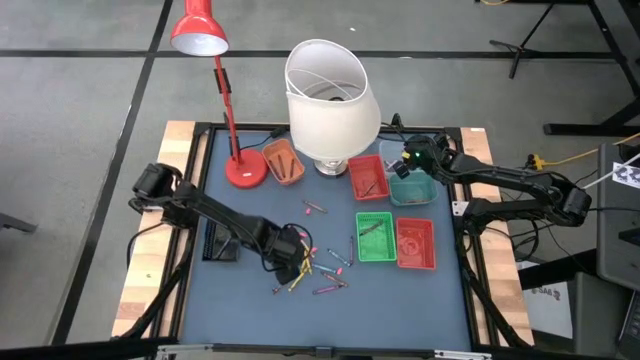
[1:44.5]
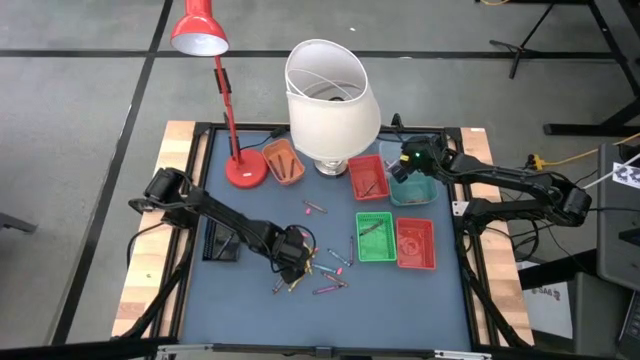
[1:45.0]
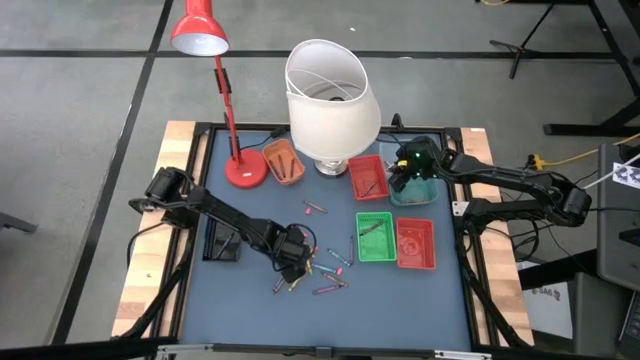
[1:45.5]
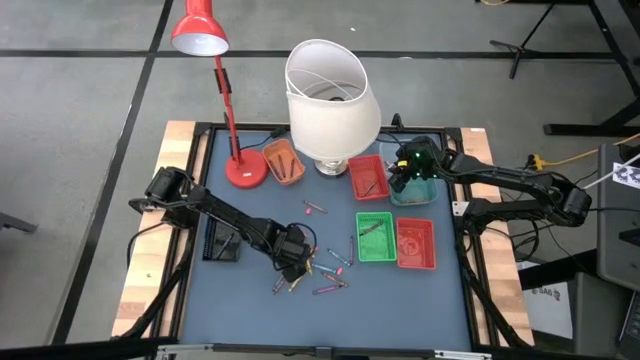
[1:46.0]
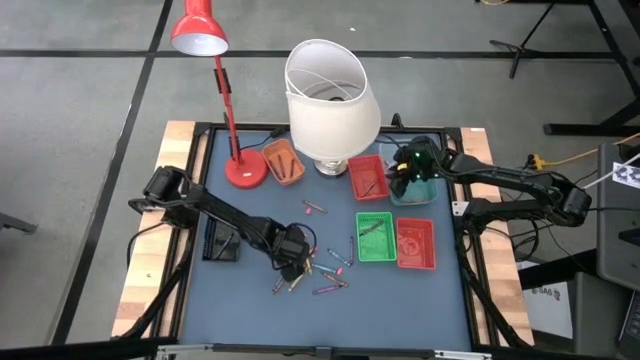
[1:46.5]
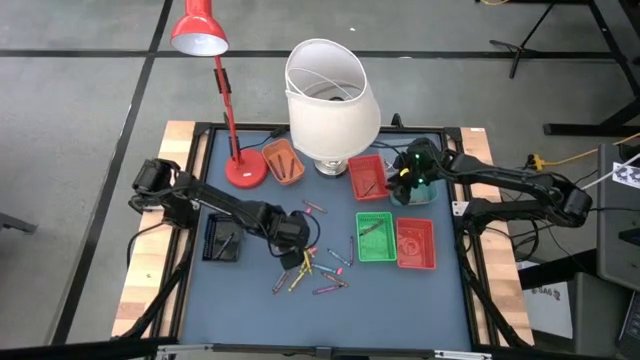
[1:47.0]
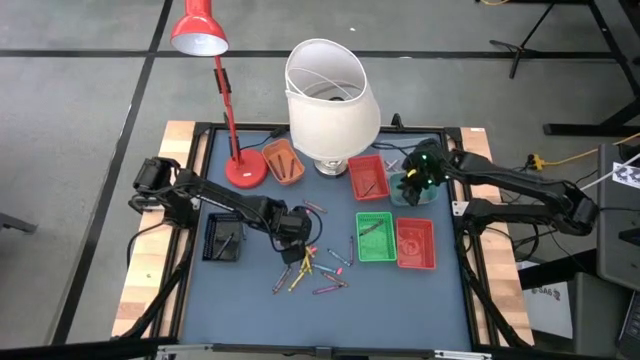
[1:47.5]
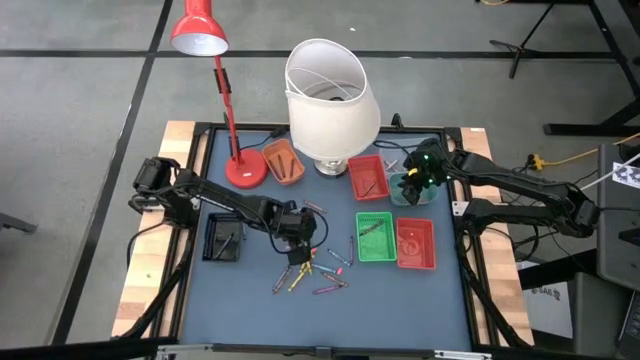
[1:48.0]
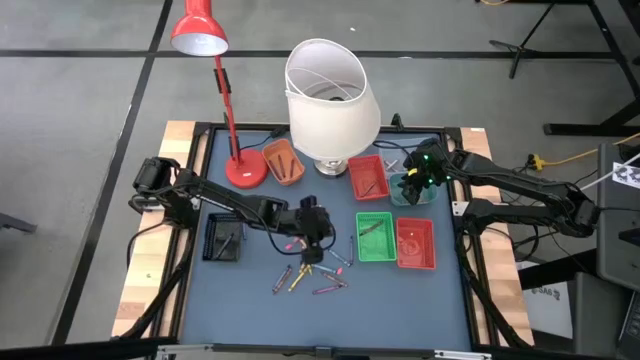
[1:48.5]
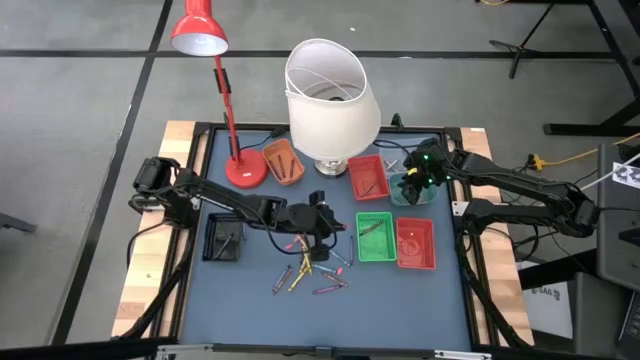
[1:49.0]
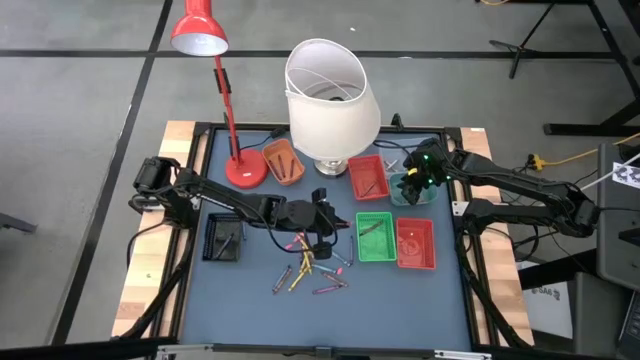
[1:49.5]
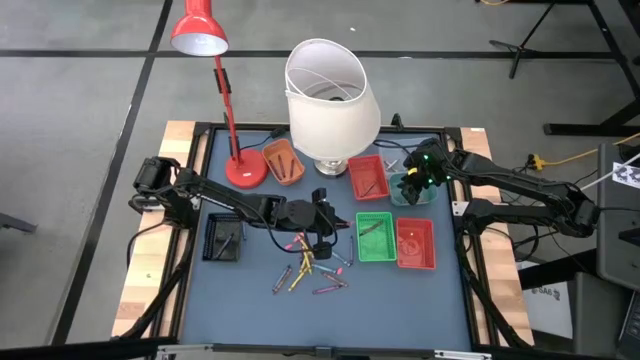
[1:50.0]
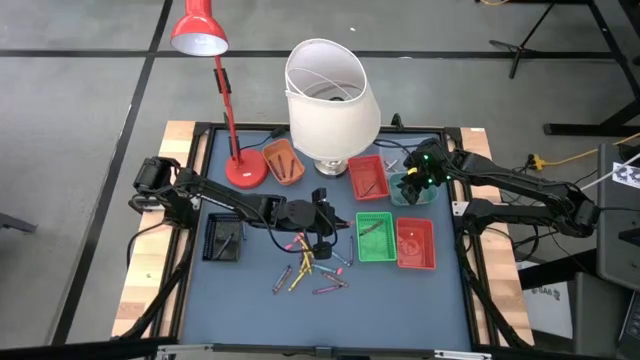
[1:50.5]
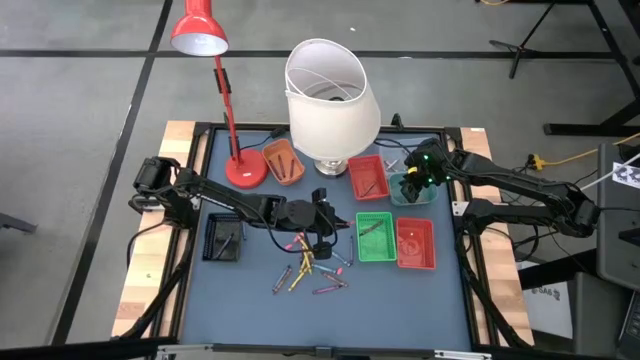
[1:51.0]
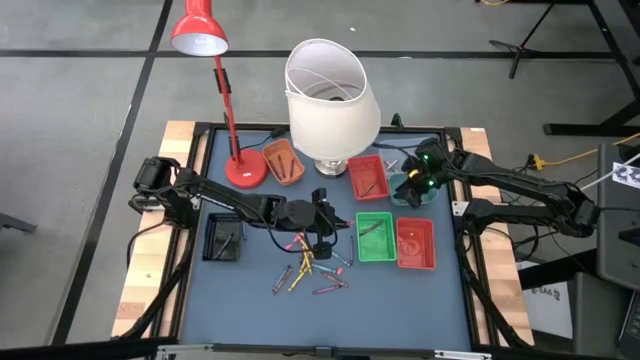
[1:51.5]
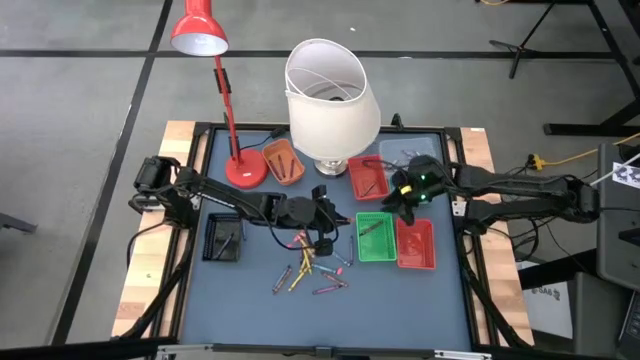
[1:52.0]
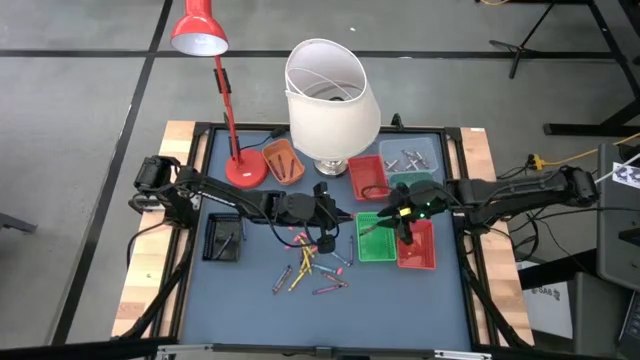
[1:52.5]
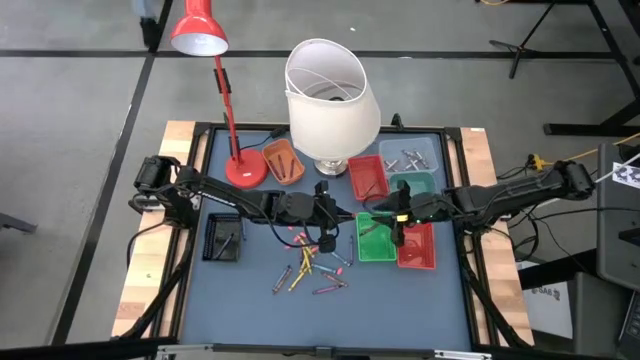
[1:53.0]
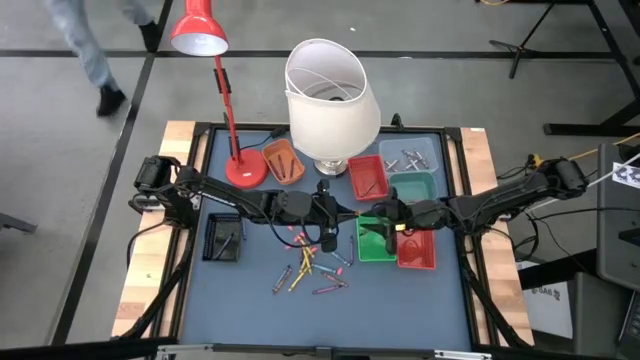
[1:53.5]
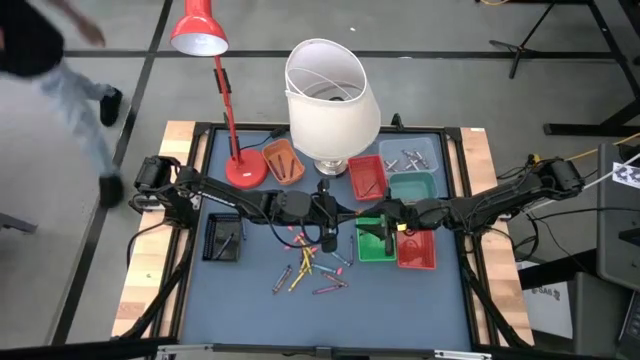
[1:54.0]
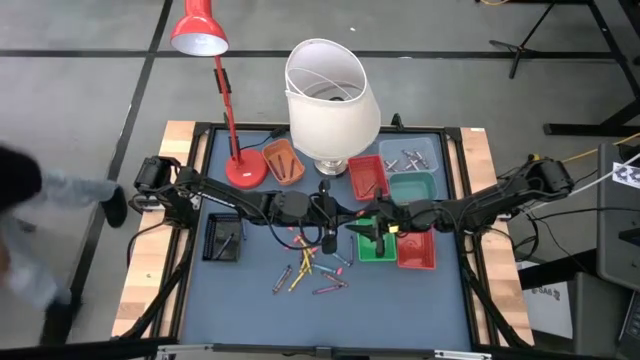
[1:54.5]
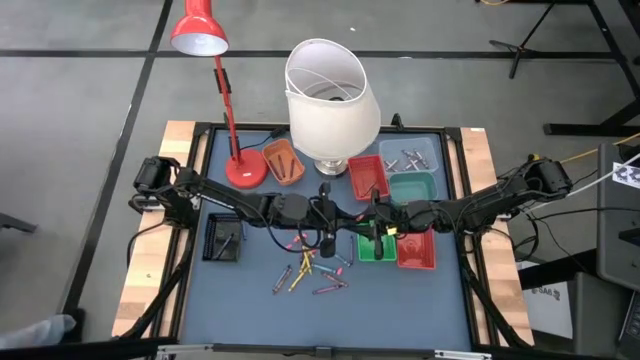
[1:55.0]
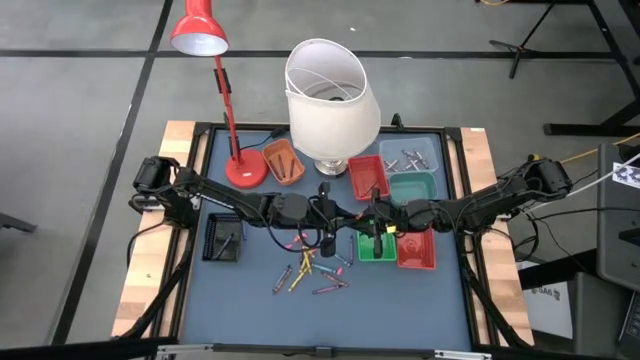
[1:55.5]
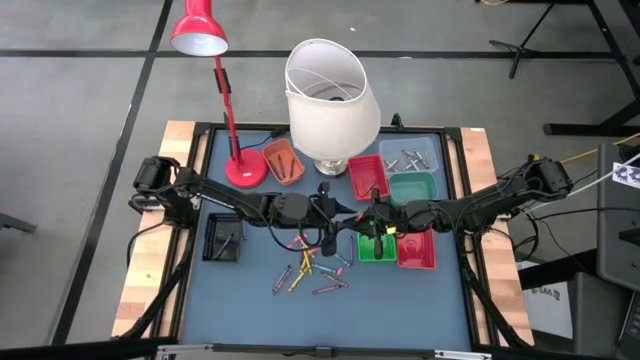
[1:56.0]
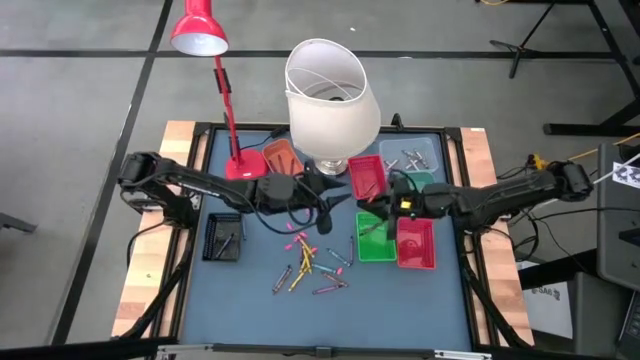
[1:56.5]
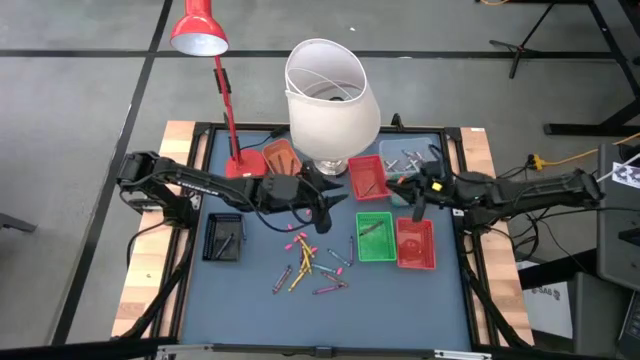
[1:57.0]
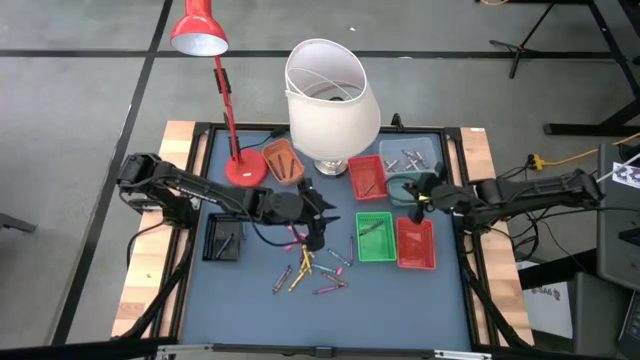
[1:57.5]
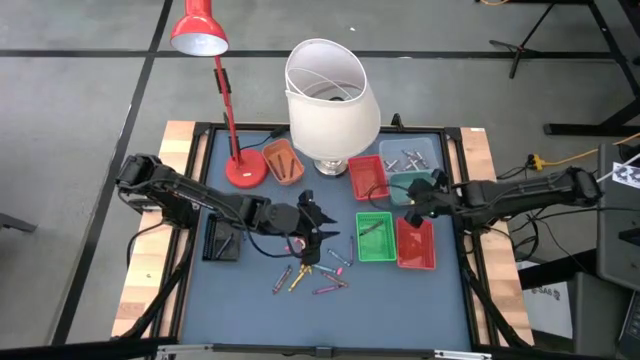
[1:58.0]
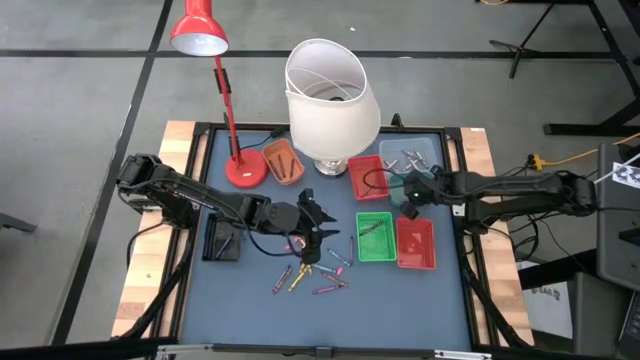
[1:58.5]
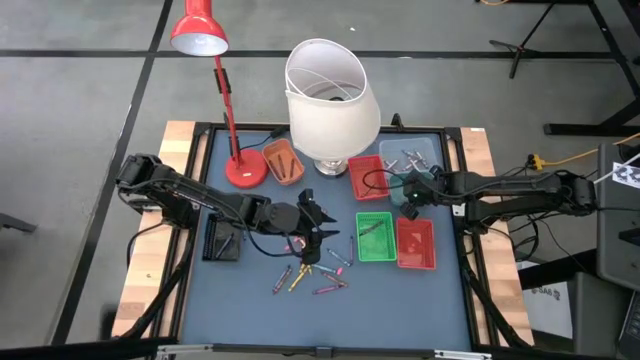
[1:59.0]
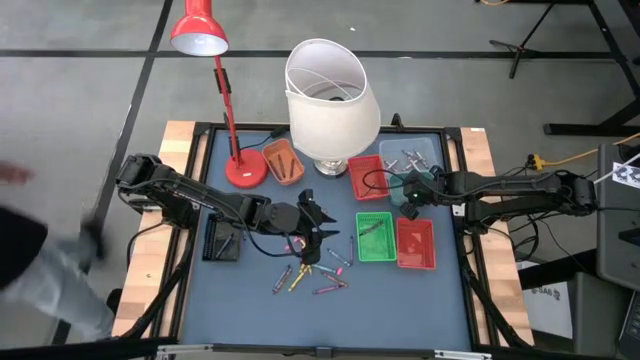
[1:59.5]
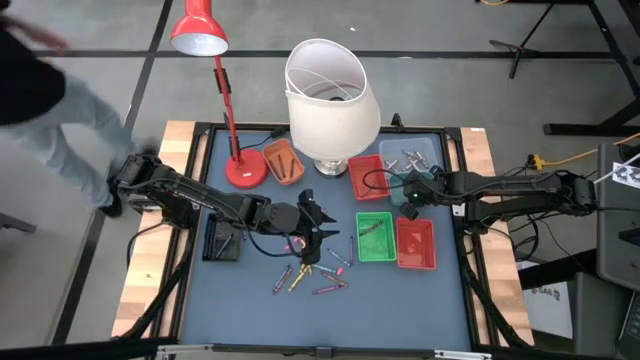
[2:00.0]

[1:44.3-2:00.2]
Task: Sort crayons
Put the orange crayon into the blue bin

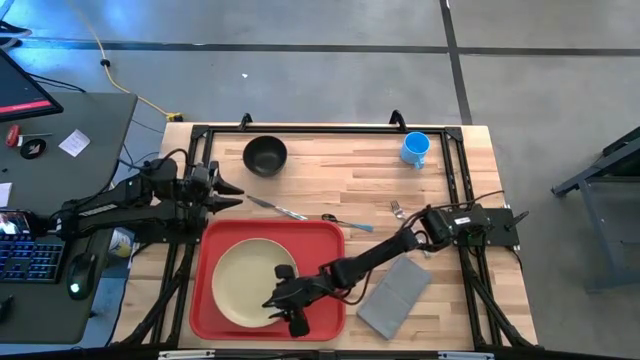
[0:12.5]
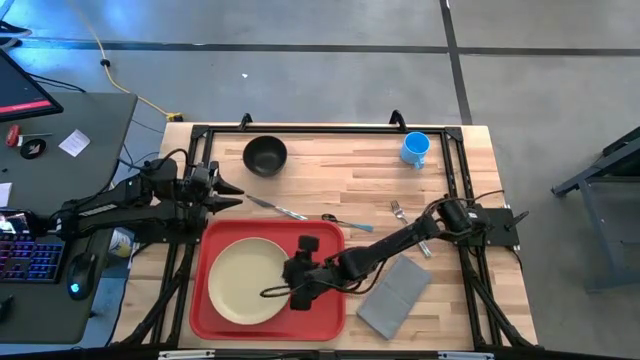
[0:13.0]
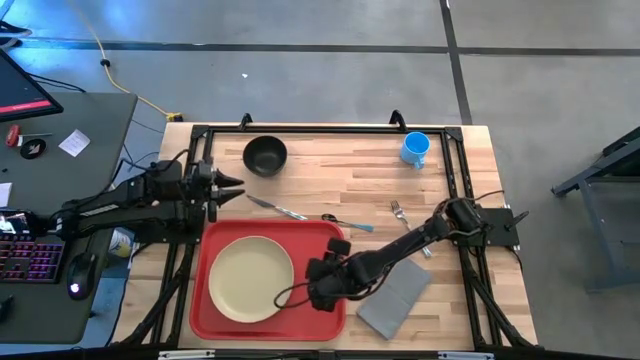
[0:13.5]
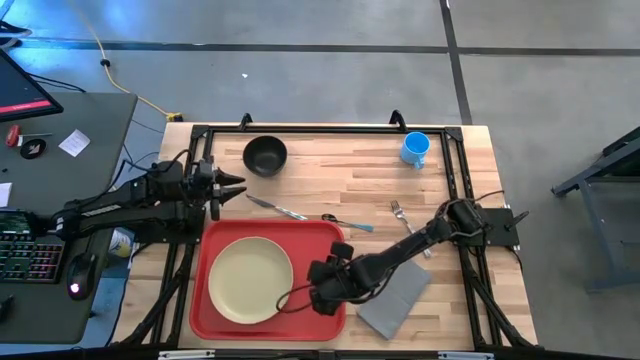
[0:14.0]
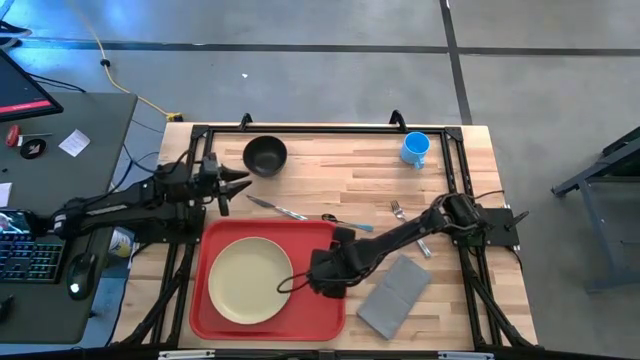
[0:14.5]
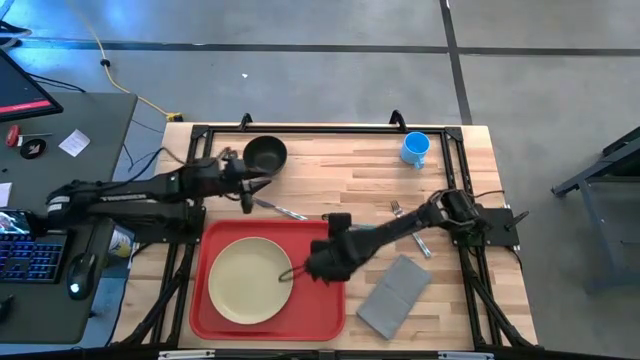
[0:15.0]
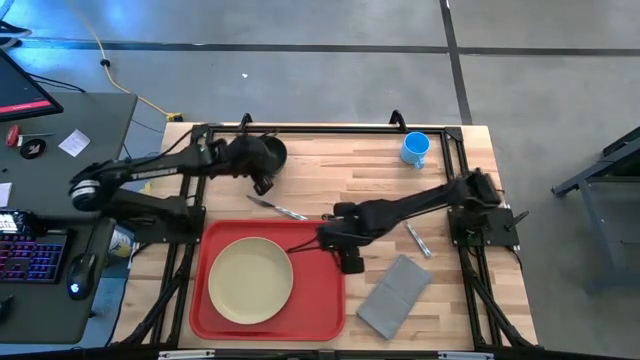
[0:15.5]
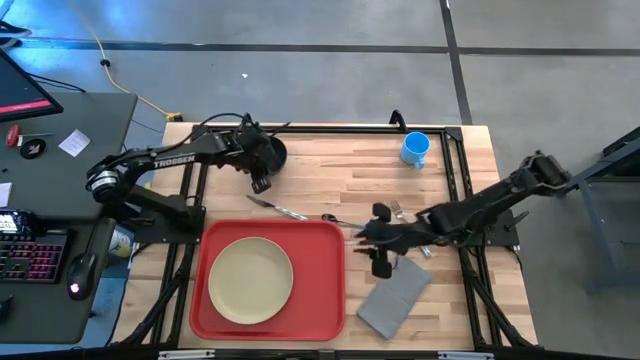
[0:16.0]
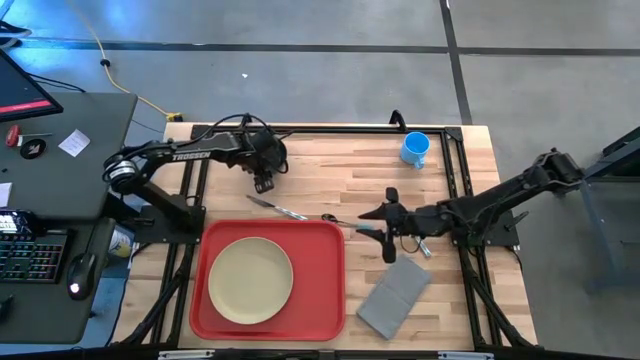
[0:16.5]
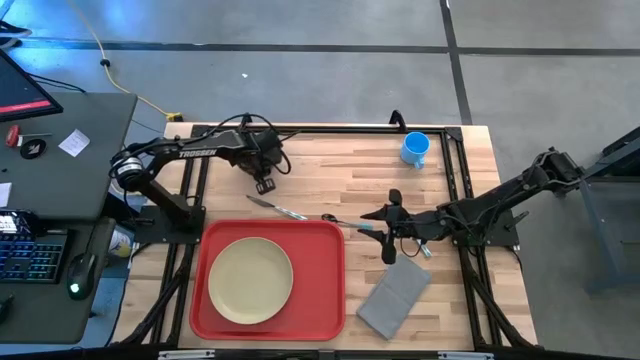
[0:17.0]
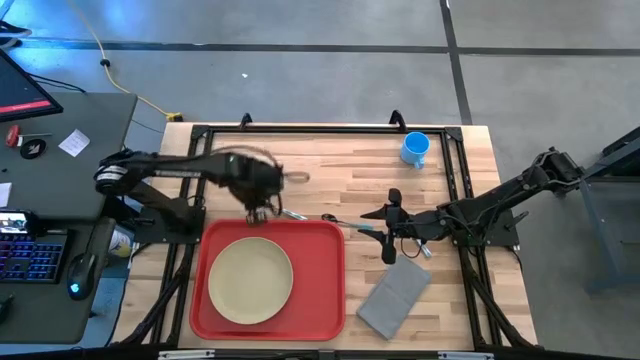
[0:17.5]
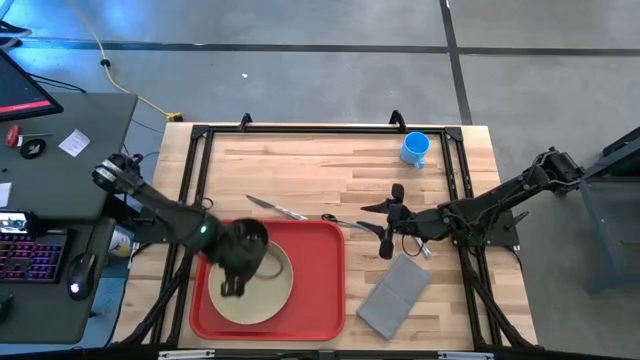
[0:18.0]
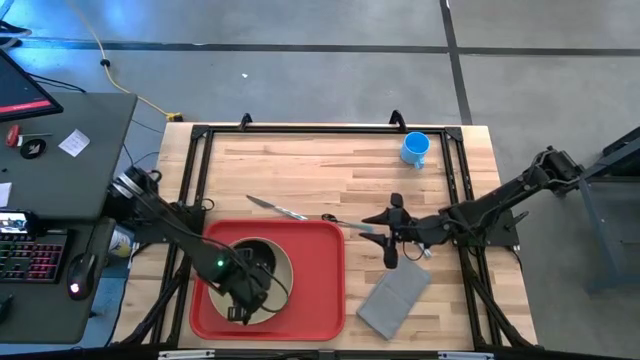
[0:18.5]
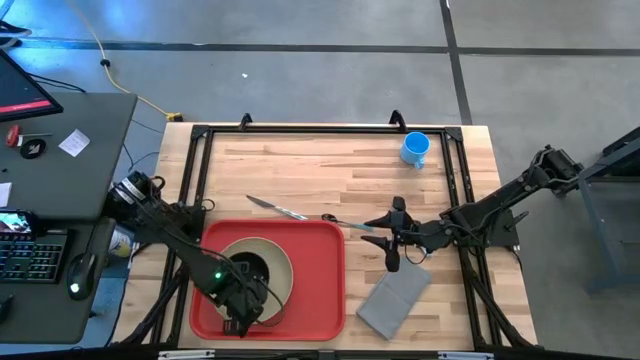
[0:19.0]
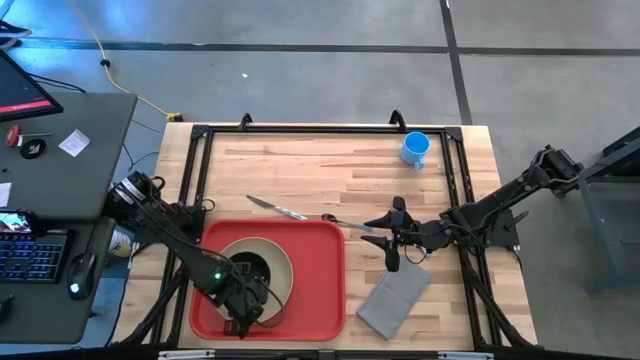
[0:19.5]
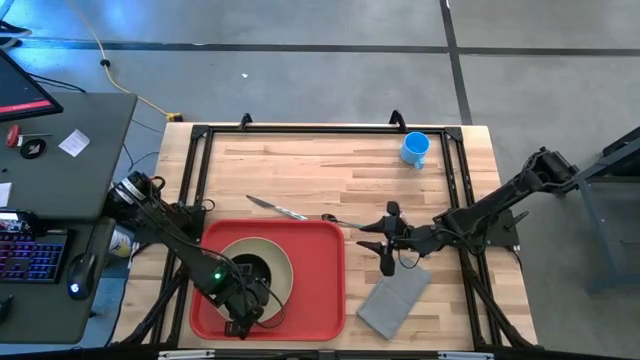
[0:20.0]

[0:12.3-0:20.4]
Task: Set up tray
Put the black bowl on top of the light brown plate
